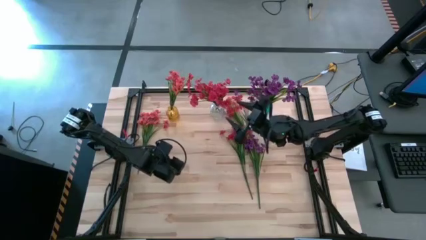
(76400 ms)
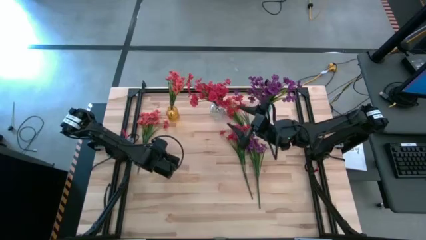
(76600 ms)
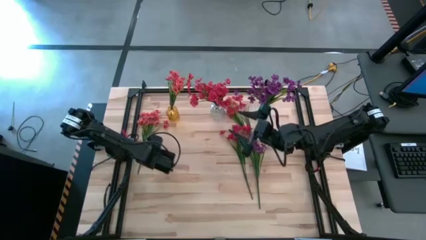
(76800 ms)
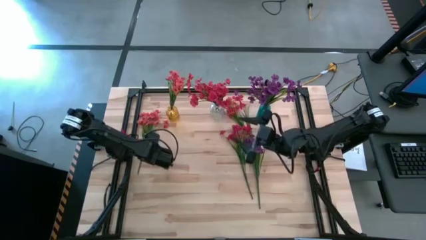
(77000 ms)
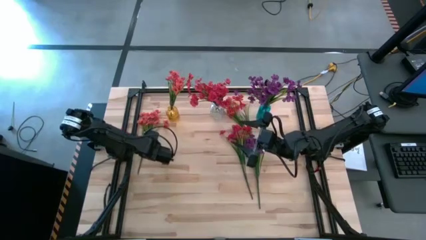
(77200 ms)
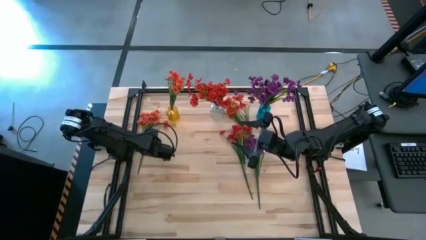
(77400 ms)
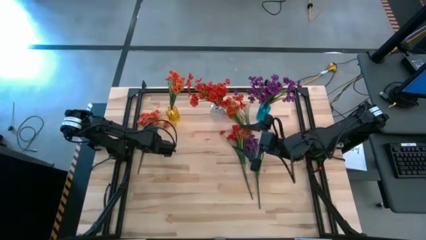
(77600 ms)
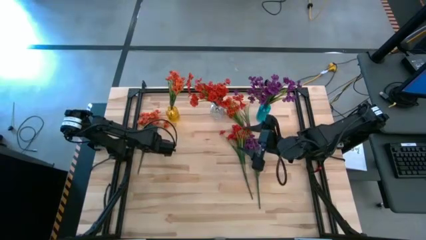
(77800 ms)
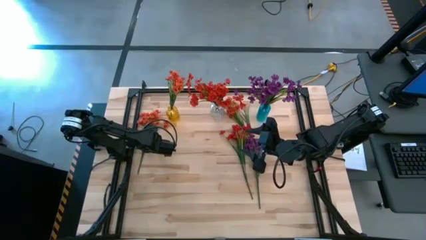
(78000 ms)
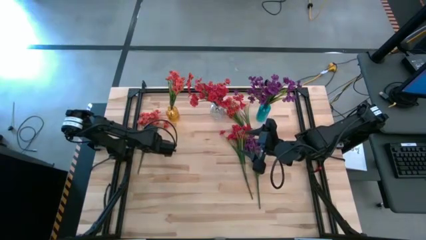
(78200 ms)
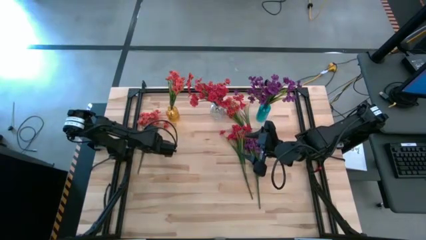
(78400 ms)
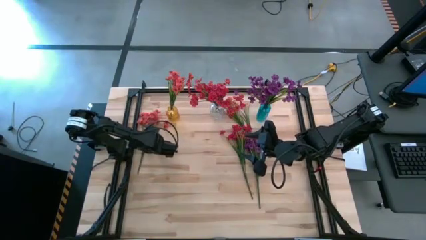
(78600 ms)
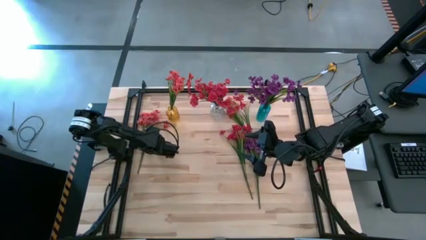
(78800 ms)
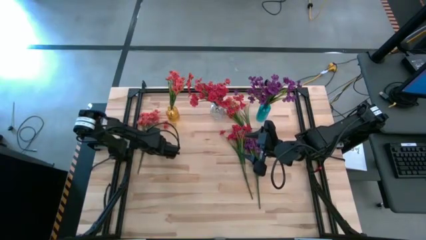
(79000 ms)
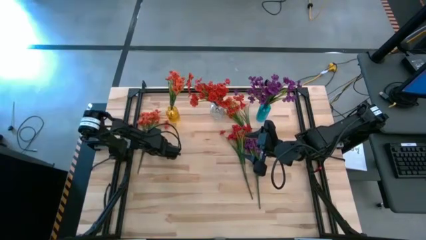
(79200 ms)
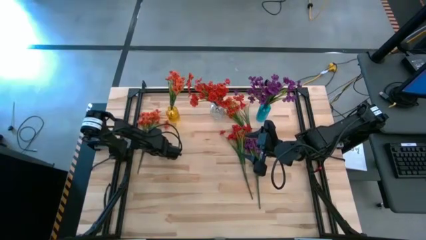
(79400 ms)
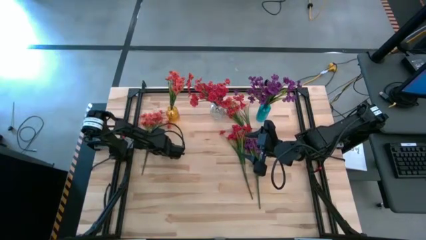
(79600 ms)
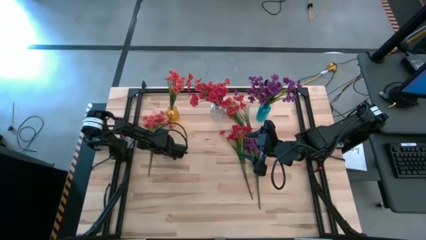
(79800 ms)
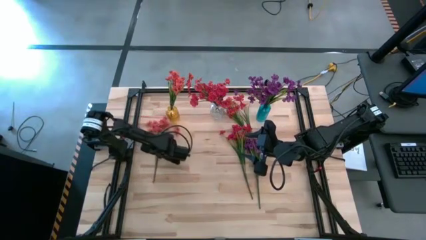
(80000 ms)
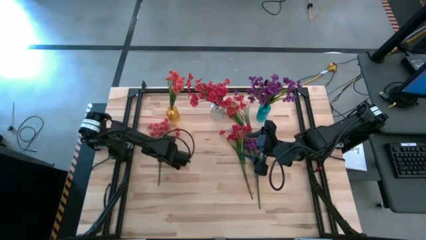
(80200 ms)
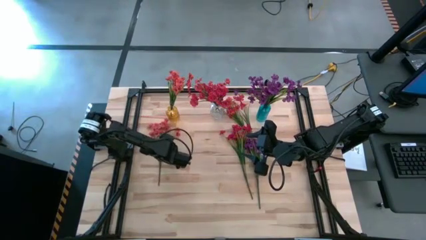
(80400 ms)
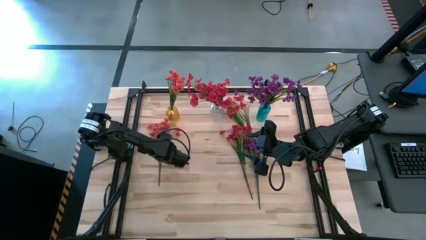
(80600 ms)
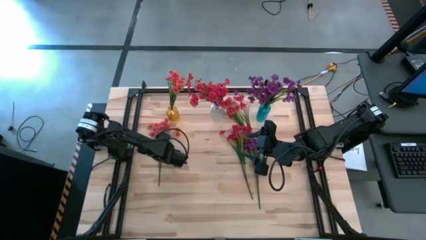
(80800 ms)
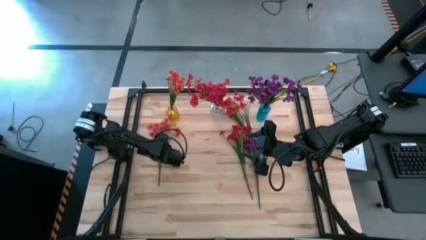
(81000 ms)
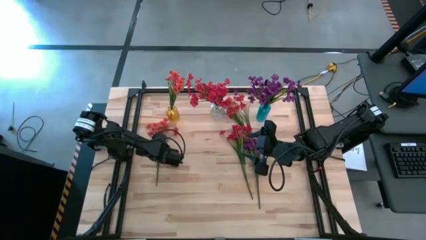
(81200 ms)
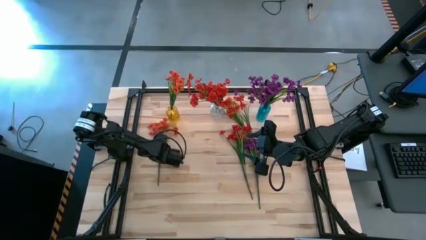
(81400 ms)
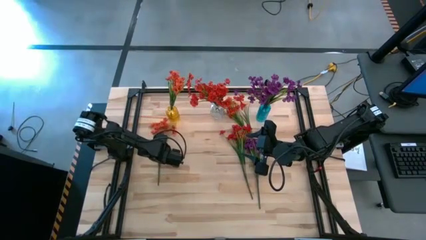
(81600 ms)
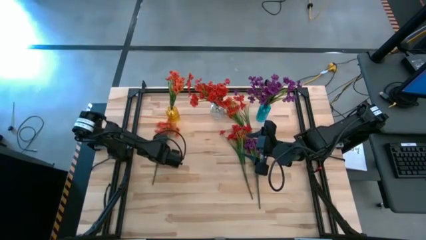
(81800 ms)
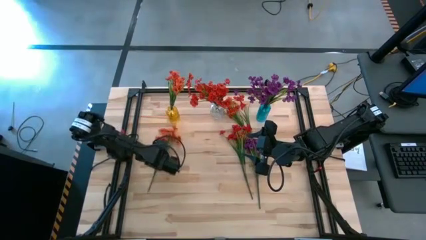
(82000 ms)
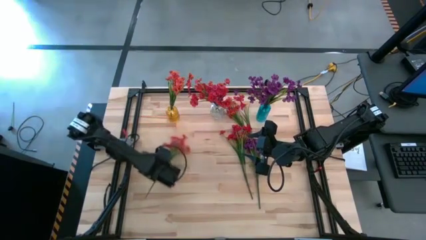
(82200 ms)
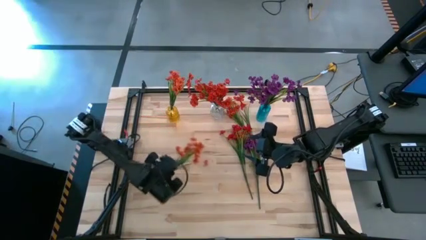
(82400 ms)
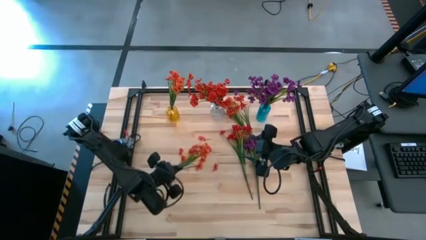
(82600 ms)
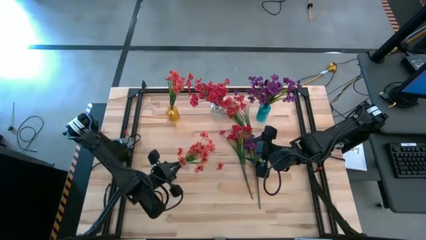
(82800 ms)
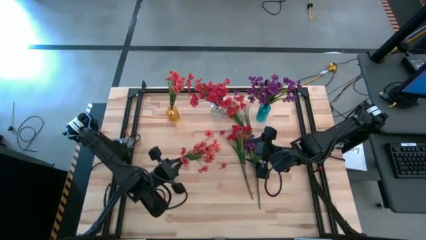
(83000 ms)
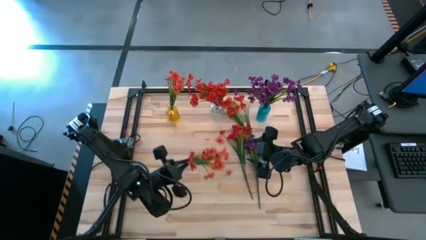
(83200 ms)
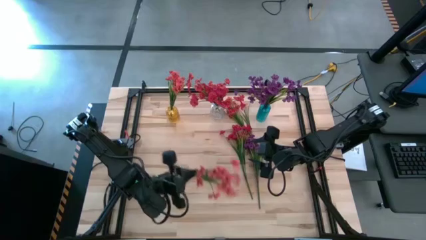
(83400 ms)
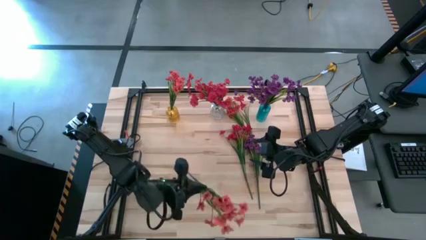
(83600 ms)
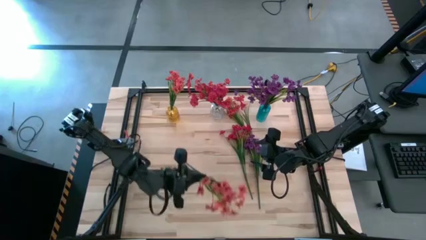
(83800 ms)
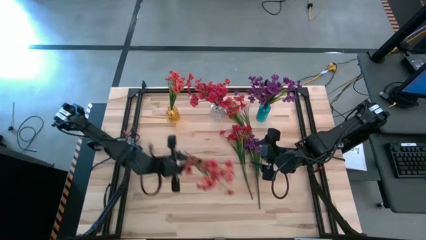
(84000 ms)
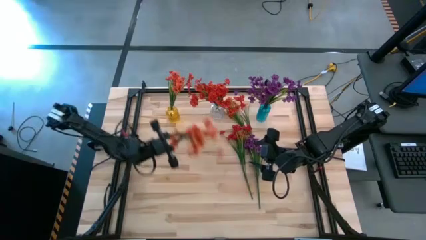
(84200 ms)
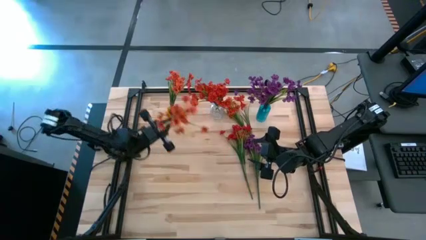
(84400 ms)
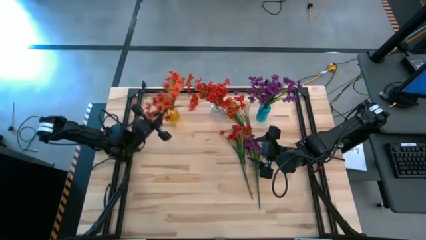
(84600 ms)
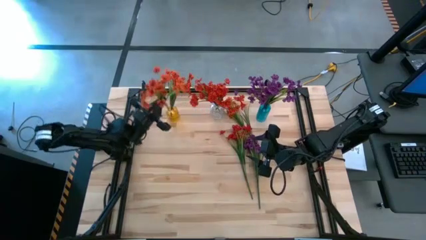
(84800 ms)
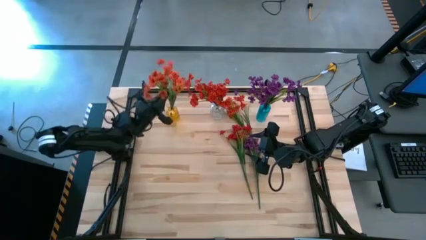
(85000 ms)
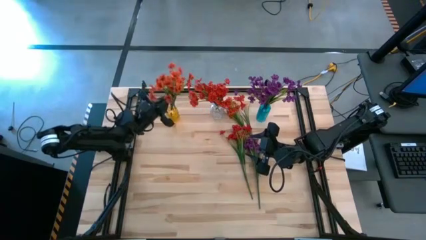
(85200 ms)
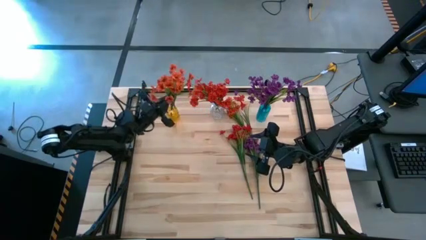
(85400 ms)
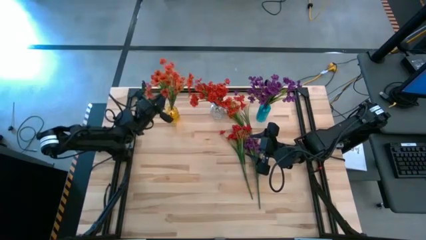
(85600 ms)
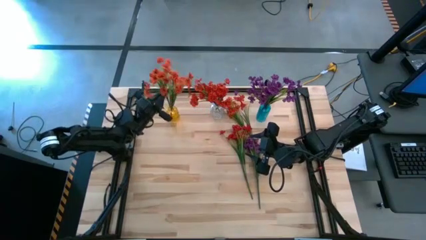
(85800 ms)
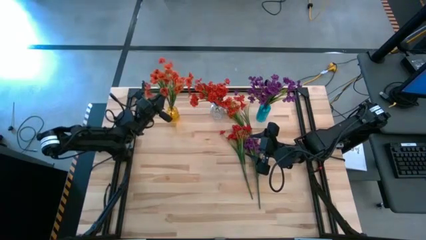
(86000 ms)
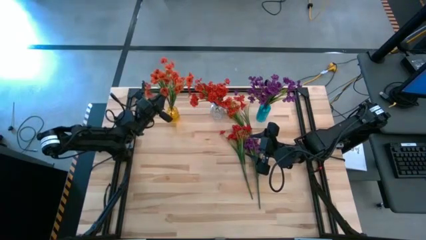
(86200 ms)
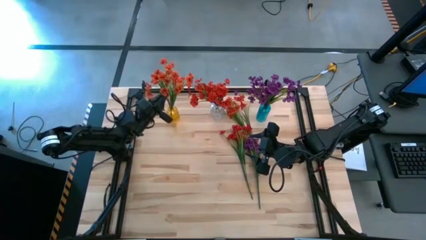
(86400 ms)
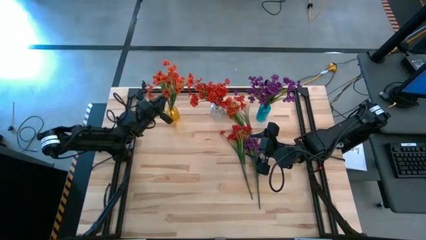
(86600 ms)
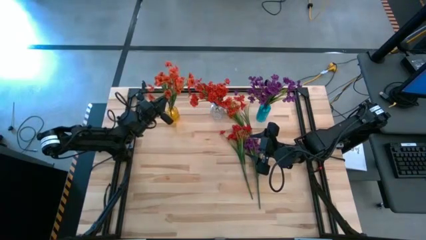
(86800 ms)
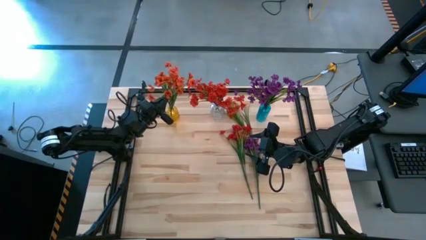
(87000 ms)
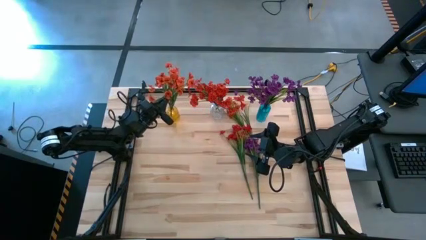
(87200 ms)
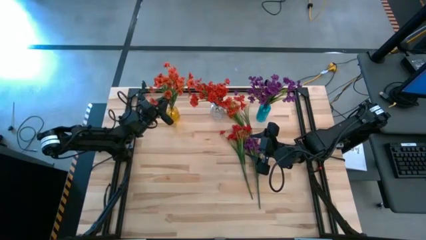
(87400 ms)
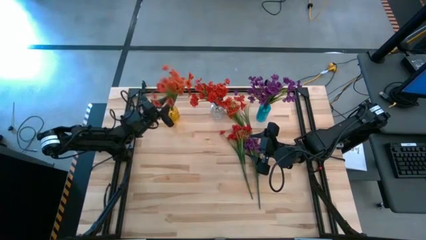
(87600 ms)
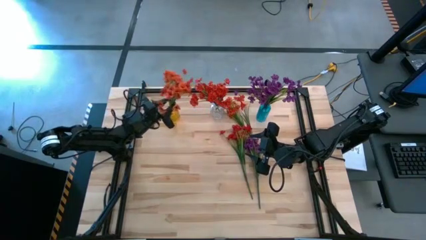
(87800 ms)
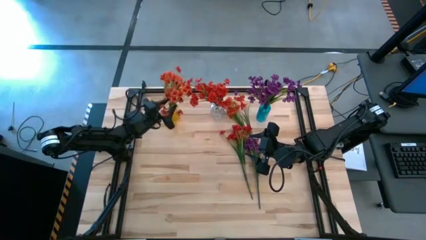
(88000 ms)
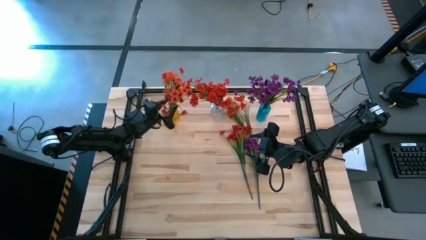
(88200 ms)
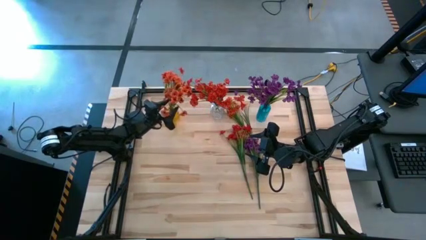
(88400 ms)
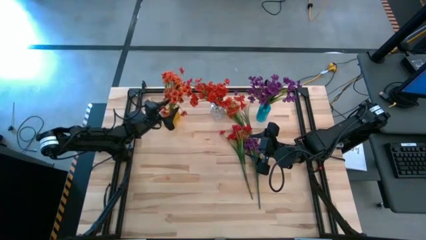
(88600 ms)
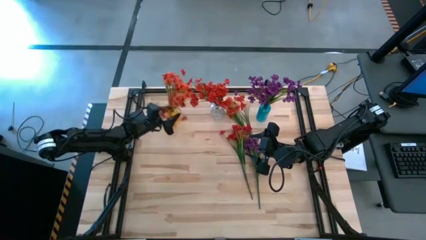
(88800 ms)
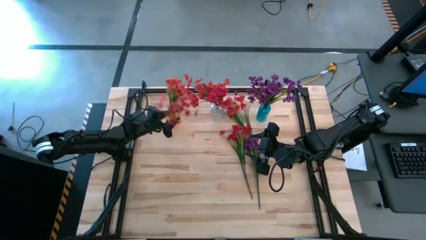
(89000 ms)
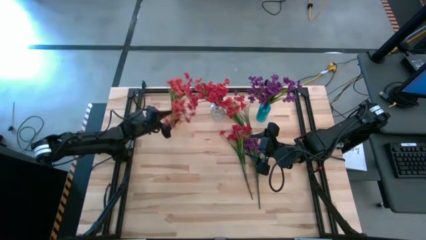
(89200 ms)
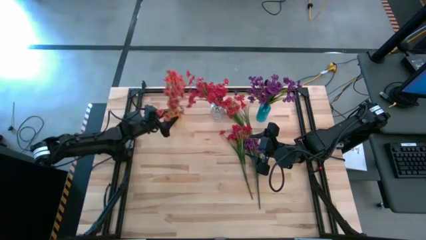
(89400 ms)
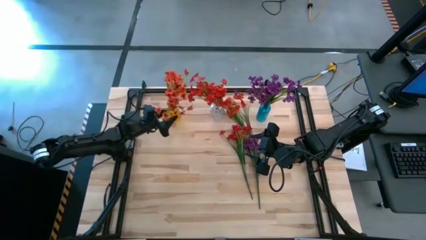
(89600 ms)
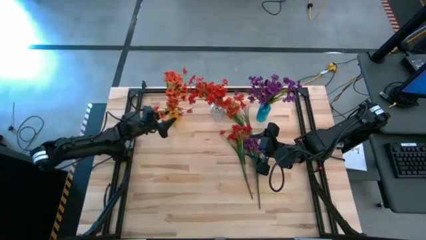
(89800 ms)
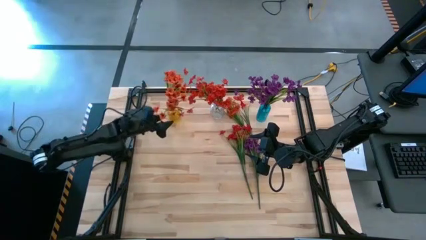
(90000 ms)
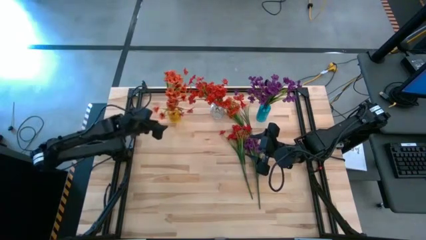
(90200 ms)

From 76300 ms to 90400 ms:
Task: Sort flowers into vase by color
Put the orange flowers into the yellow vase
